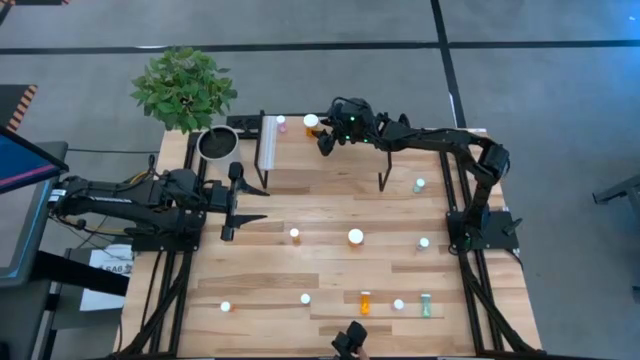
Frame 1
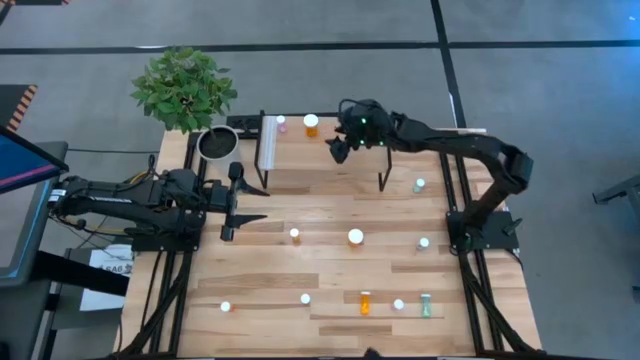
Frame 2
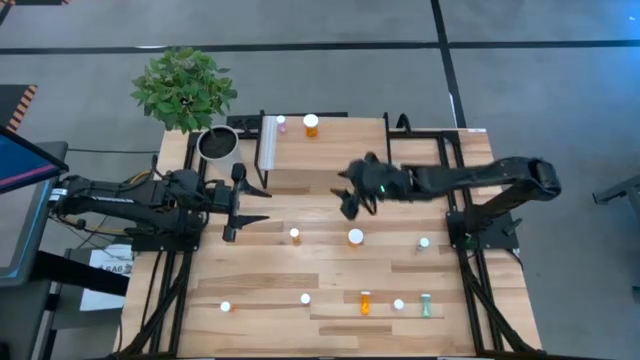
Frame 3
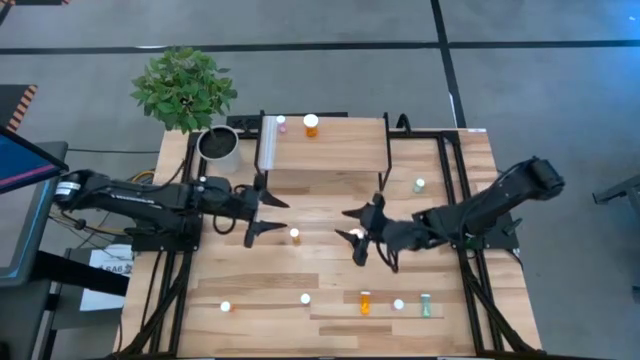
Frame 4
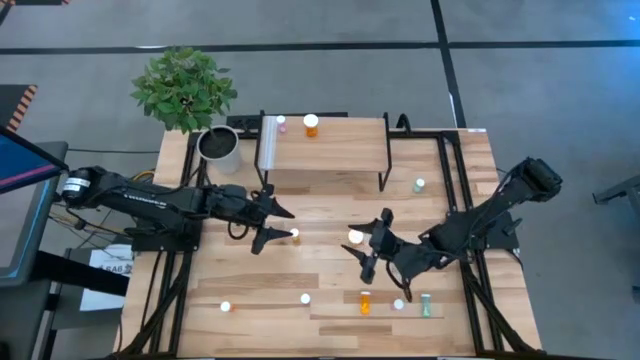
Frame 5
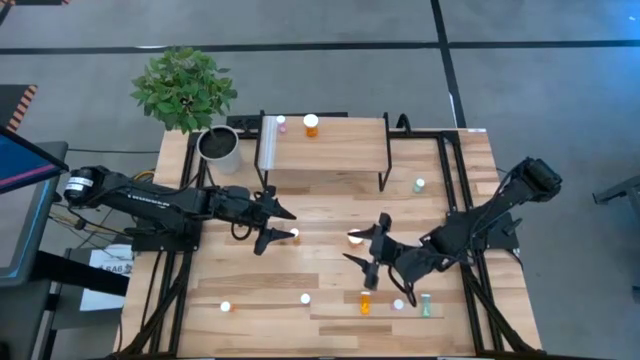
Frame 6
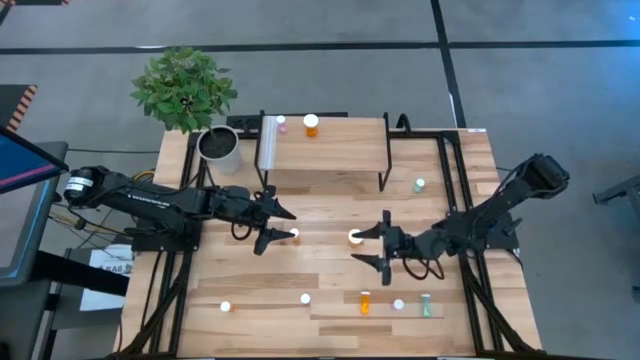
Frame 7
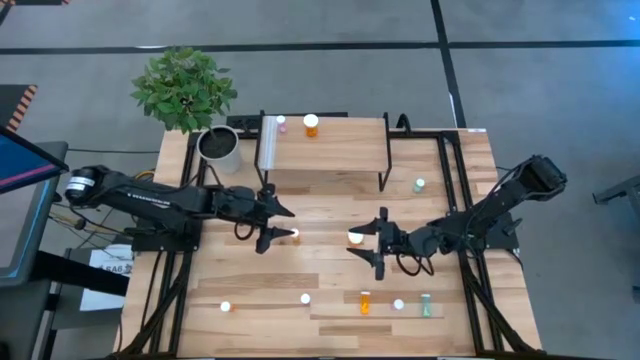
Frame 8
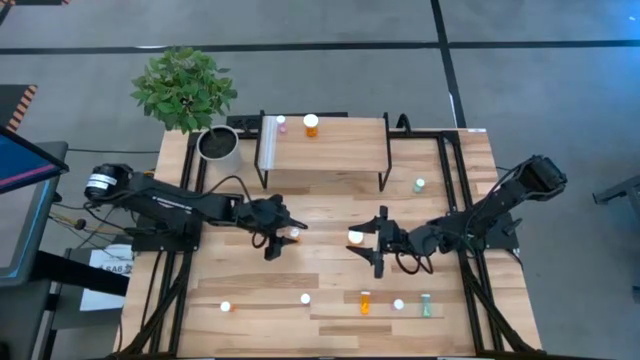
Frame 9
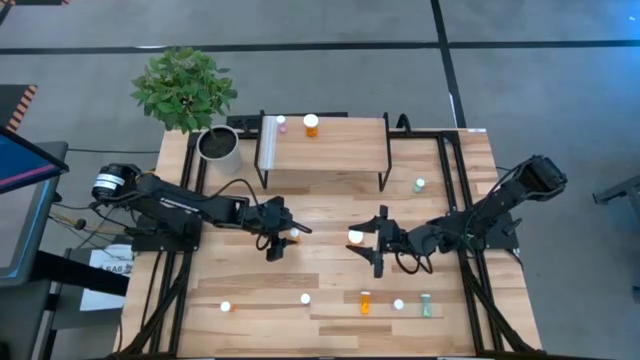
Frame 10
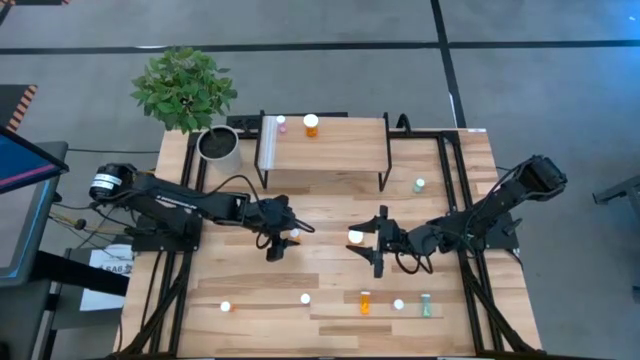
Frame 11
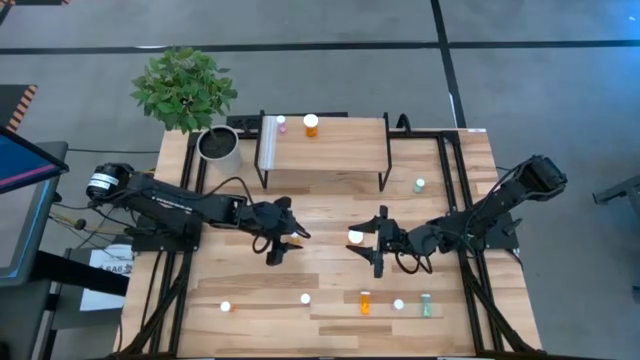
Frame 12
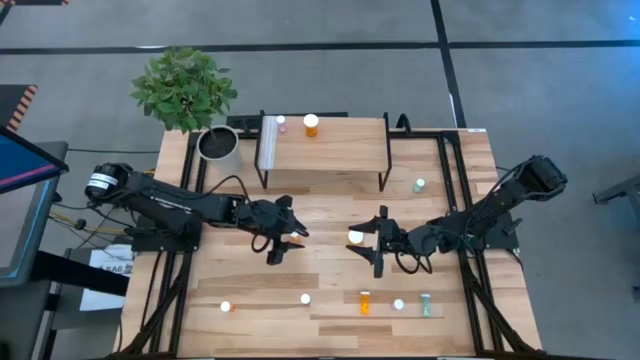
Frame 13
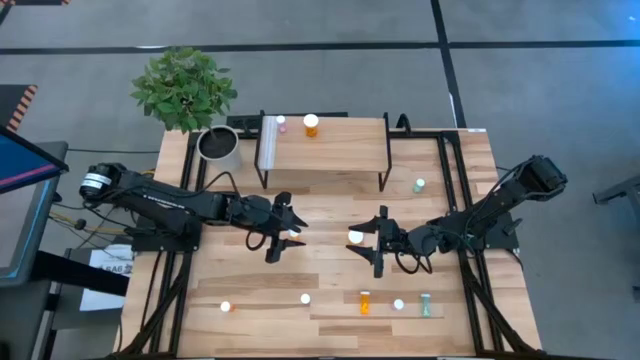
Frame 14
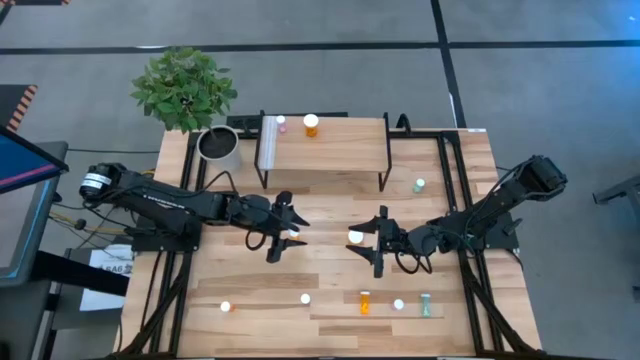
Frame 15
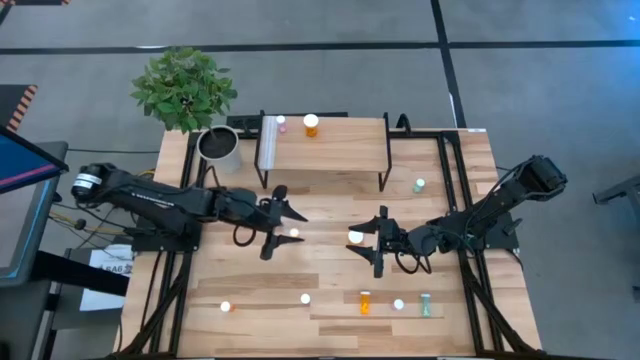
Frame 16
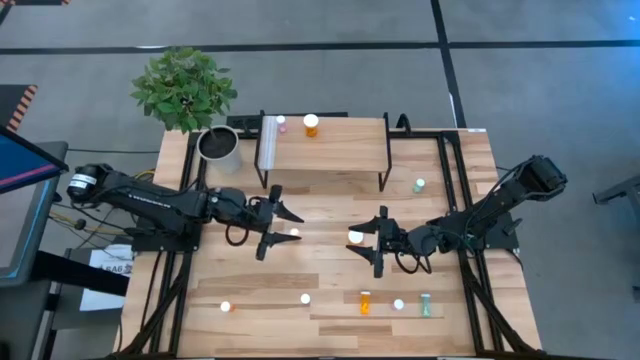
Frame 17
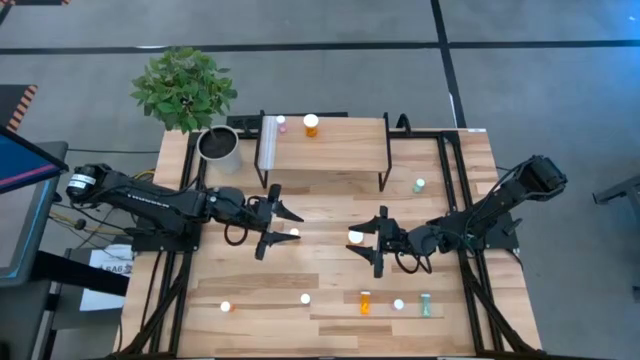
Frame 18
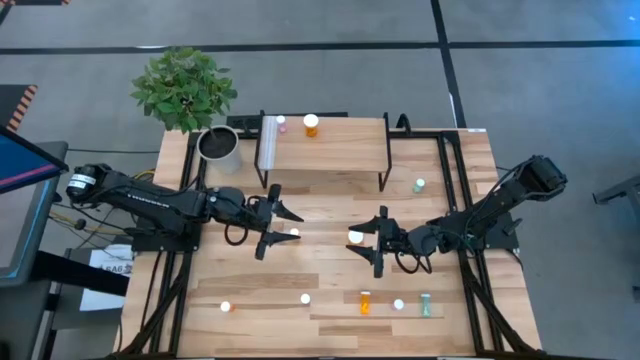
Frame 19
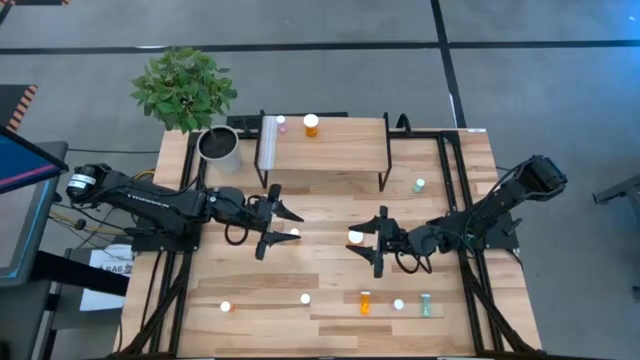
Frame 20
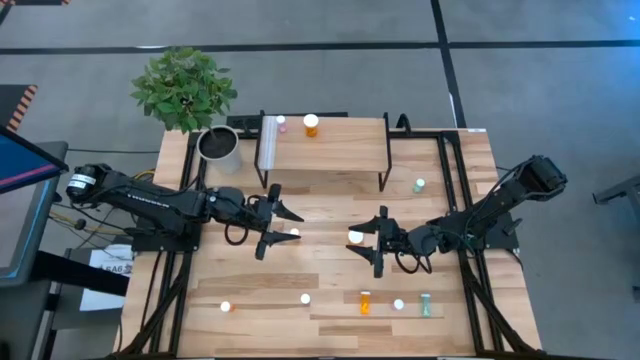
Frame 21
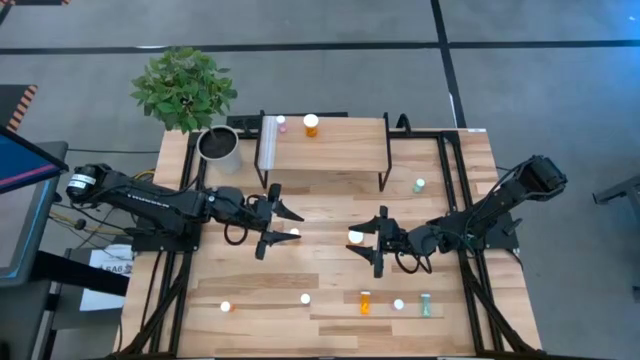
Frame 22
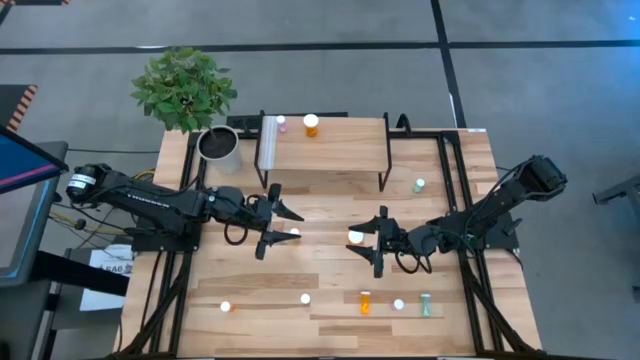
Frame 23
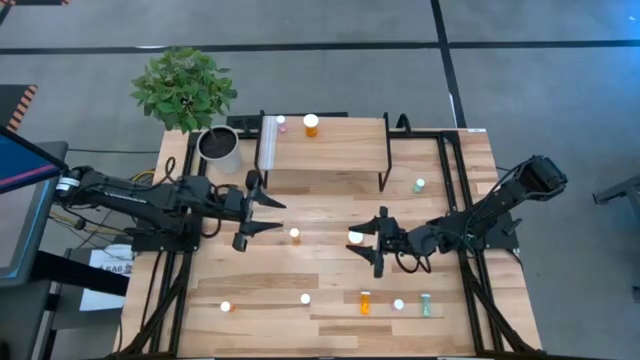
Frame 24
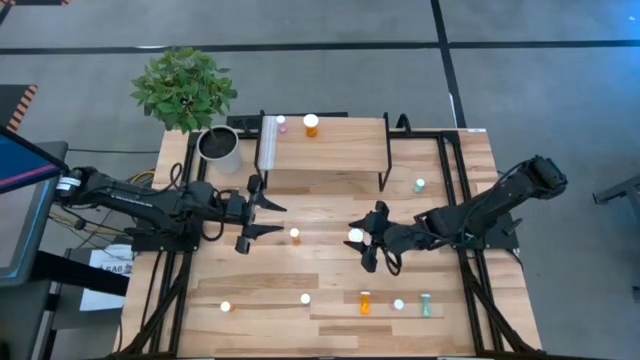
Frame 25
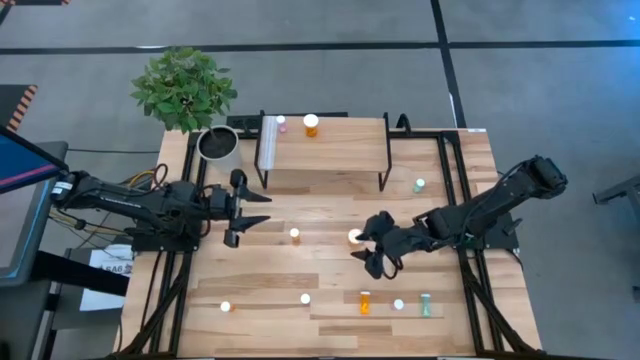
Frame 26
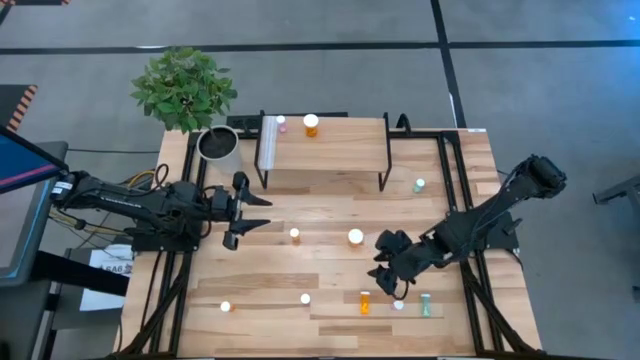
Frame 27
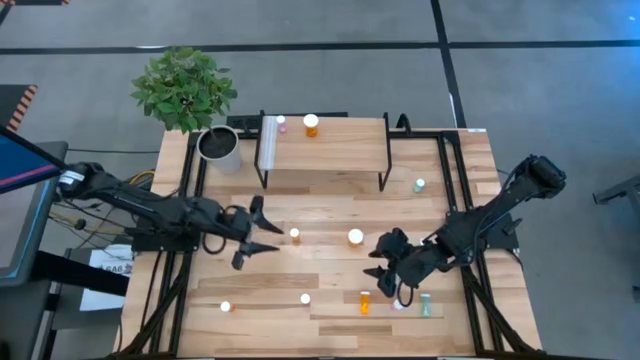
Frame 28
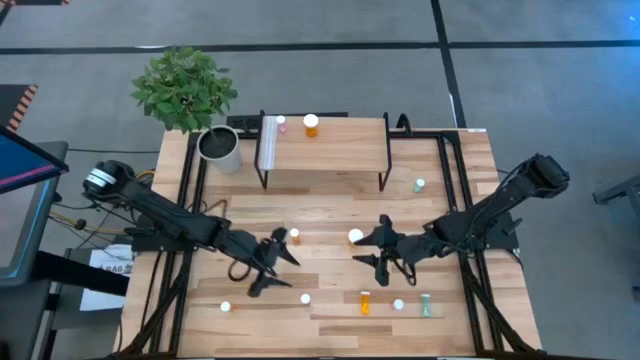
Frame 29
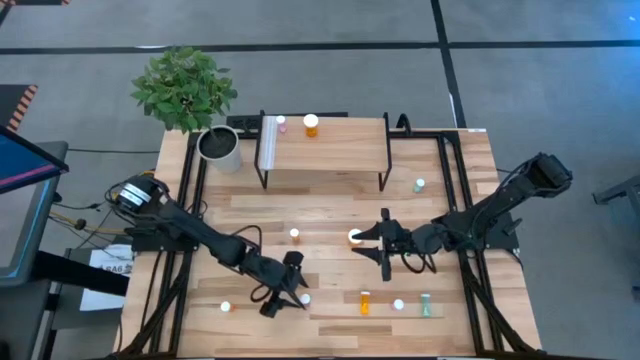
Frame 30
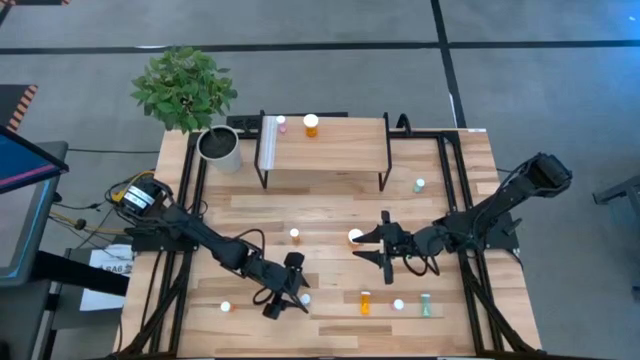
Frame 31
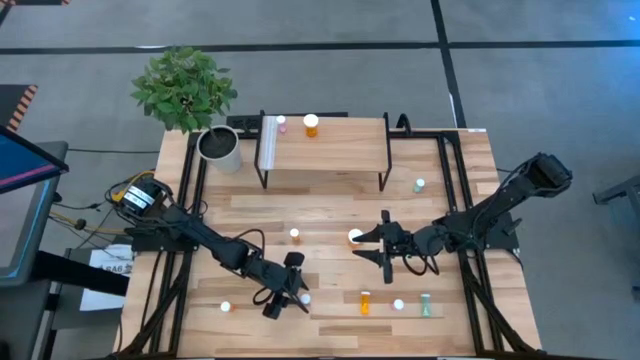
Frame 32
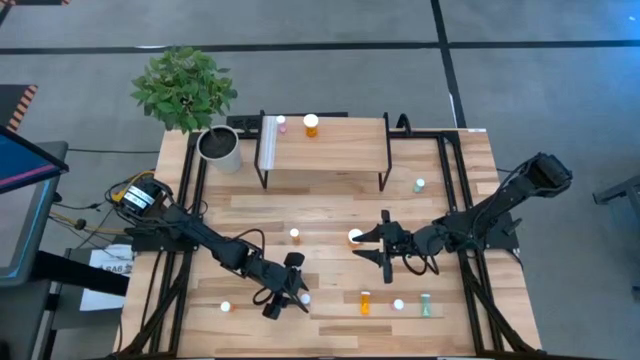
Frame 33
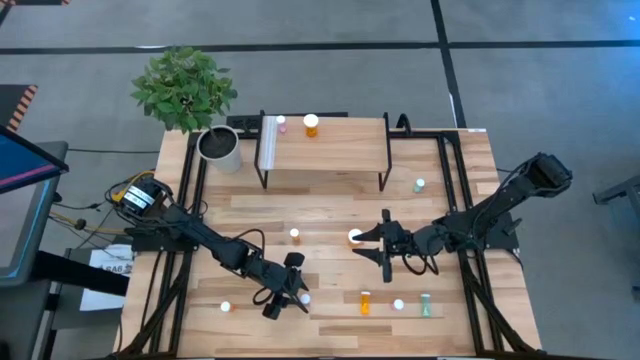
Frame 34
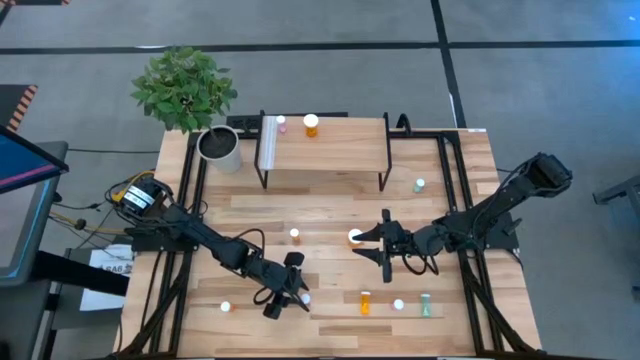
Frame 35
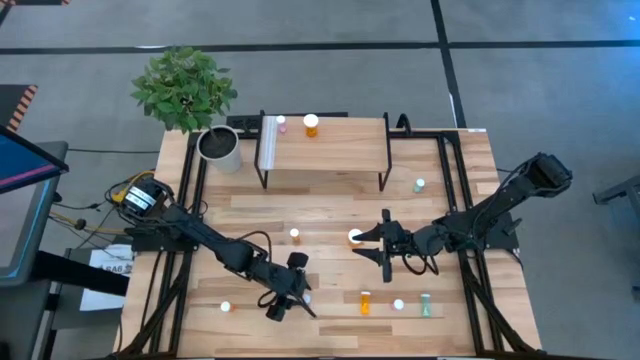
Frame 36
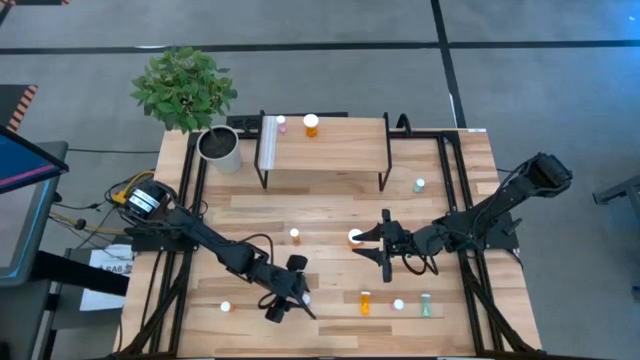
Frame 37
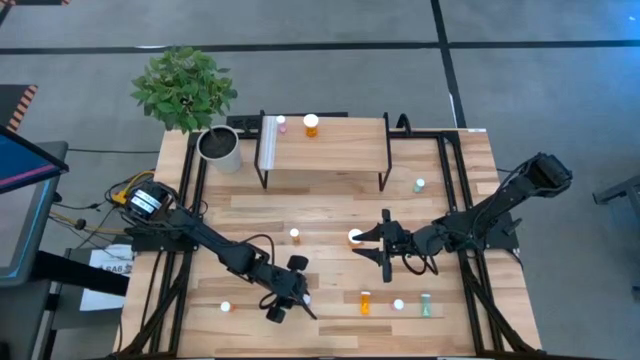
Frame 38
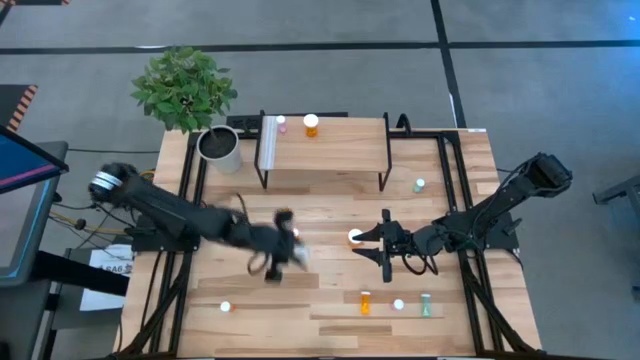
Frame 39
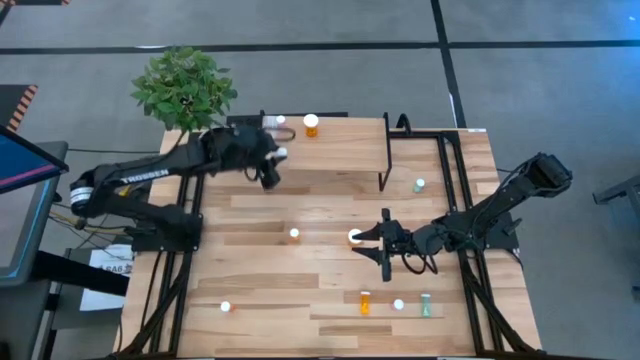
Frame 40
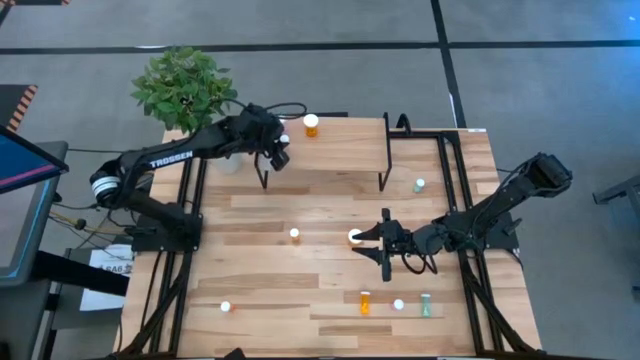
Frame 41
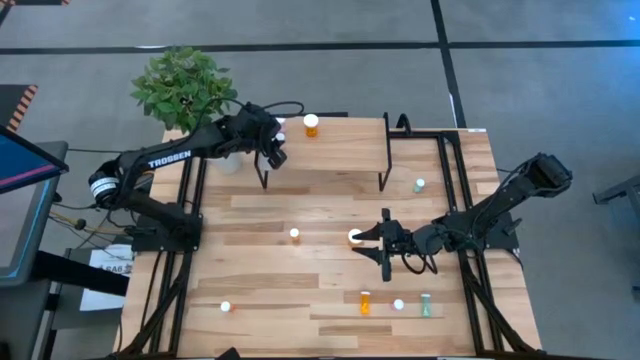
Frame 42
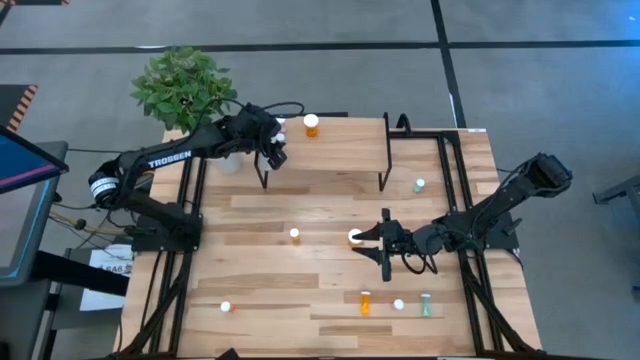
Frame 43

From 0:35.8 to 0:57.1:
Task: Pick and place medicine bottles onto shelf by color
Put the left pink pill bottle on the shelf aligned with the other pink bottle

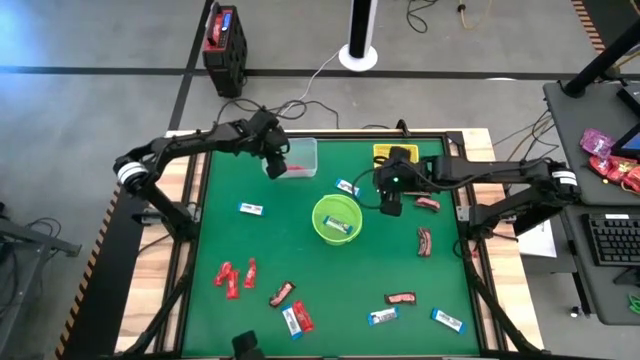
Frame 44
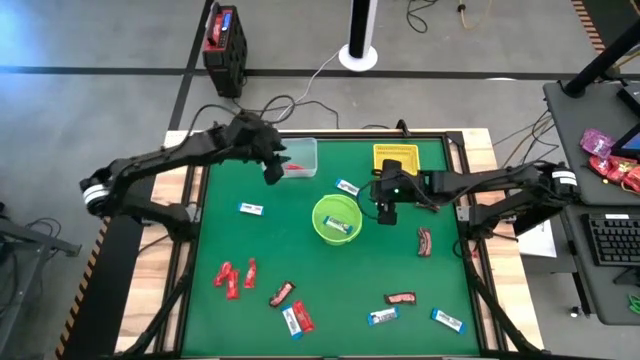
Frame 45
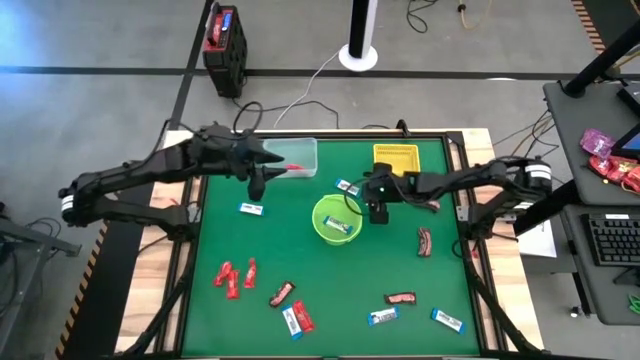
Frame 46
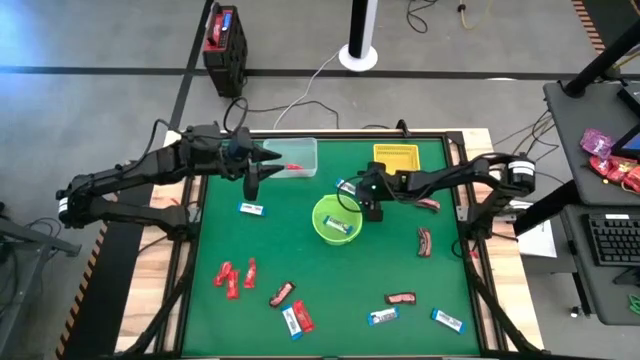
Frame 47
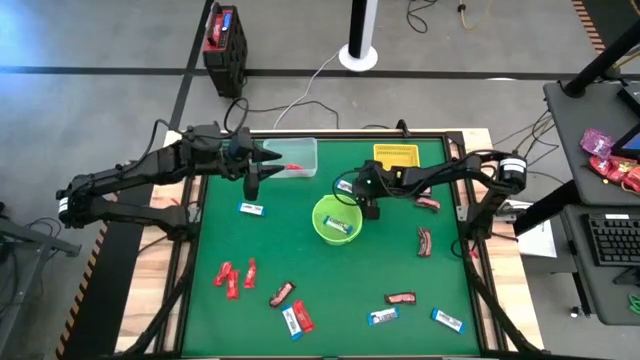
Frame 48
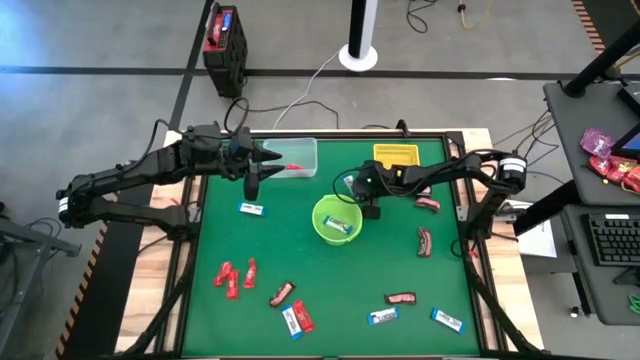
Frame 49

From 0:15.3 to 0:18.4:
Task: Sort candy by brand, put in halloween buckets
Put the white chocolate into the green bucket
